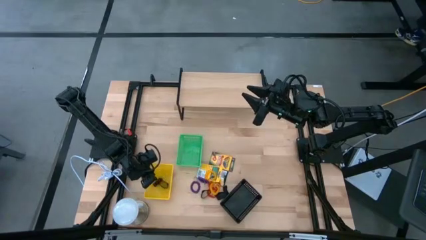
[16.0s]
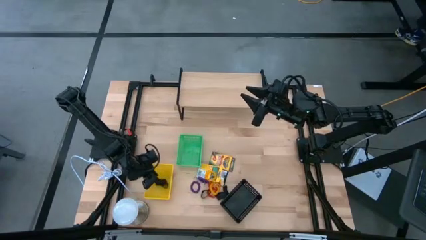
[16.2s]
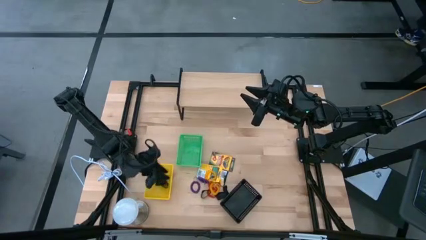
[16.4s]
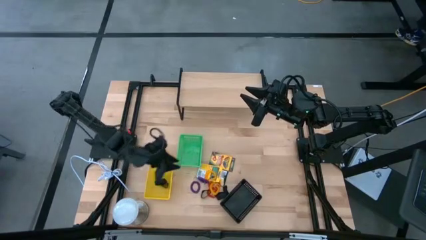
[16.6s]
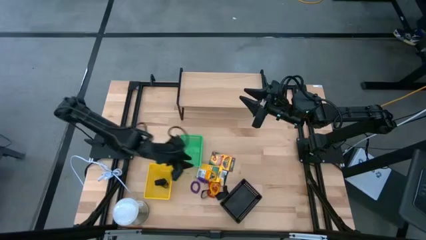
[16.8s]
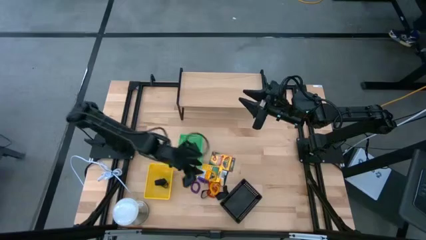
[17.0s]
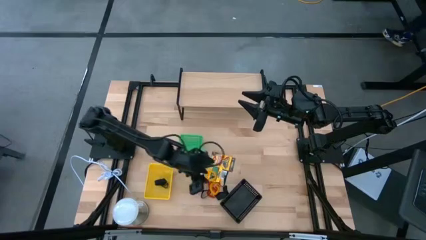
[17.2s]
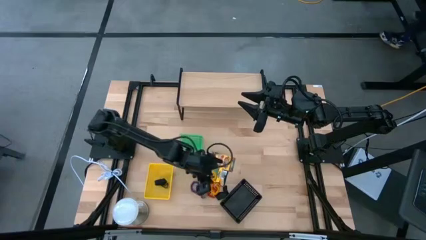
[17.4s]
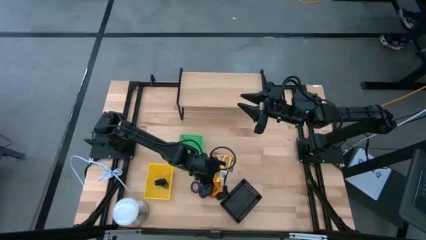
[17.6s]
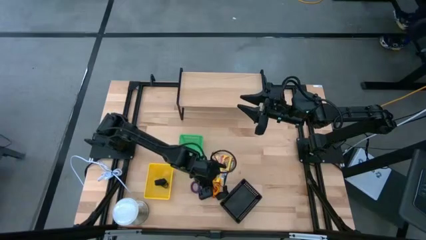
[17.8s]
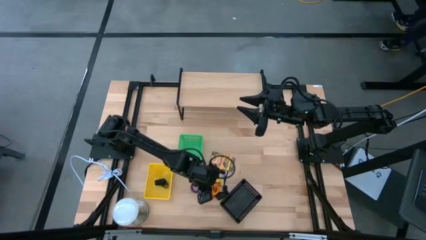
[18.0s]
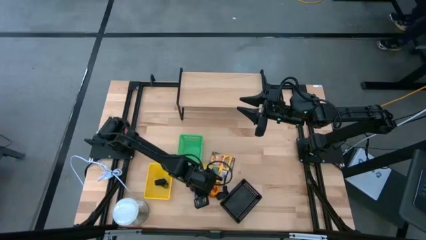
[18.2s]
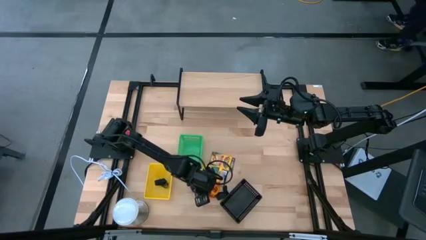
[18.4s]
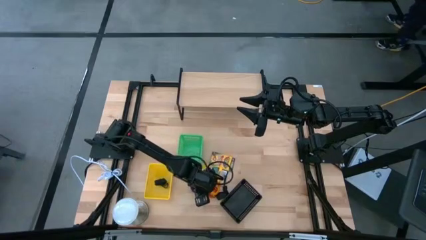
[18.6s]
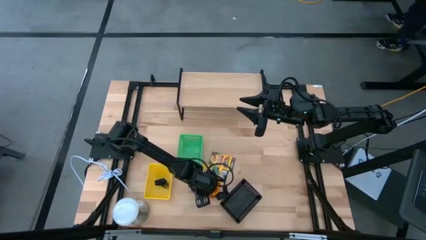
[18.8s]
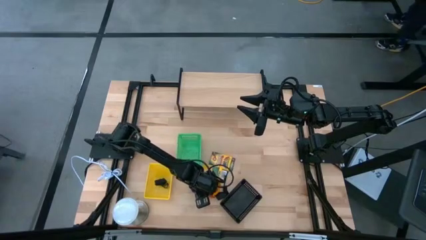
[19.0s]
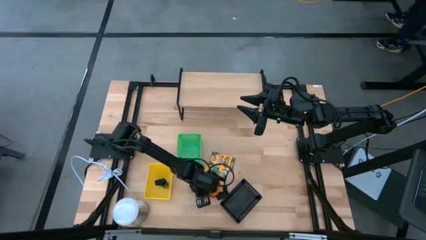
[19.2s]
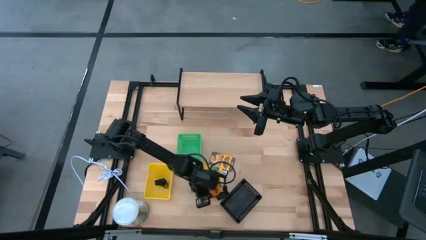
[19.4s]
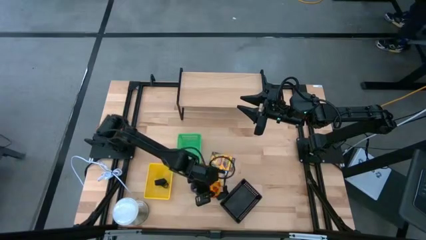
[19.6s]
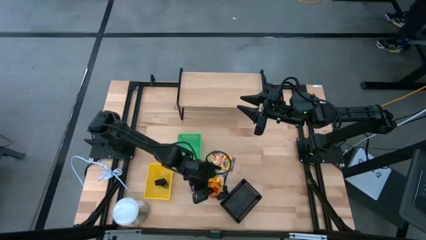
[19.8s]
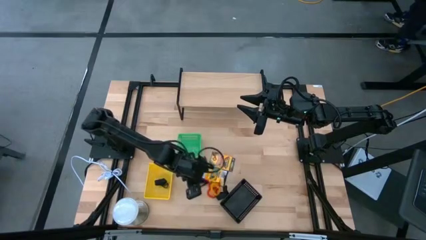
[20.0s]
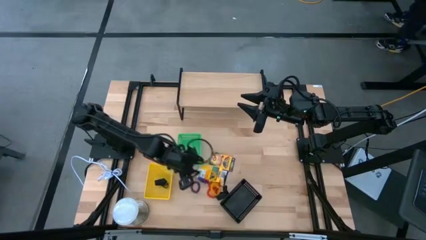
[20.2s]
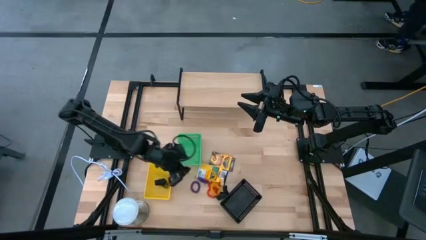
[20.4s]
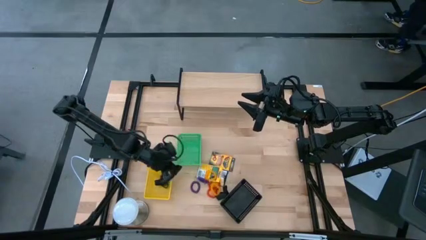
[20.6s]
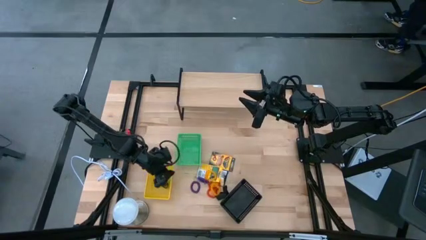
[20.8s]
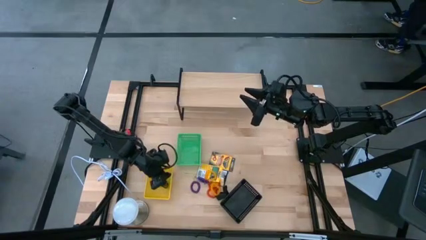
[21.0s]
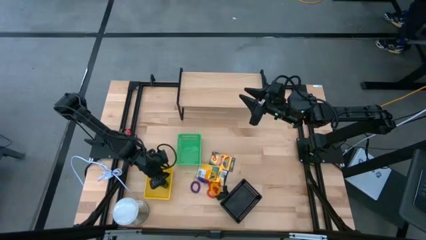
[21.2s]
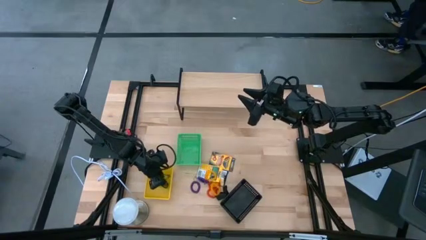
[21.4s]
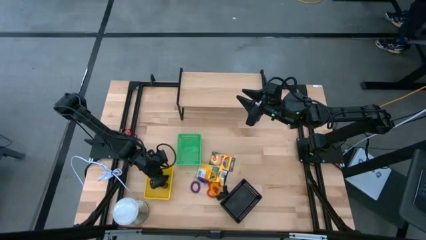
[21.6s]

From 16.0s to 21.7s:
Task: Pick & Place Office Desk Supplies
Put the black rubber band into the yellow basket

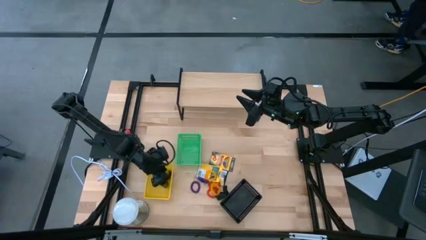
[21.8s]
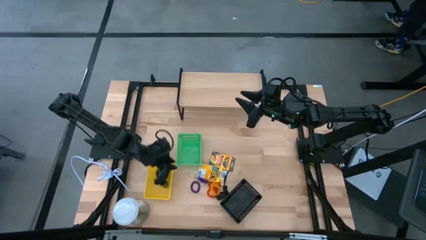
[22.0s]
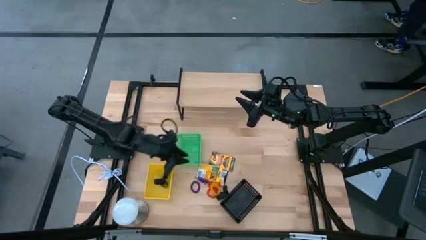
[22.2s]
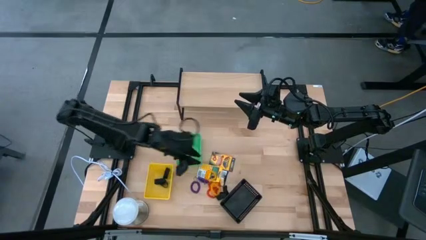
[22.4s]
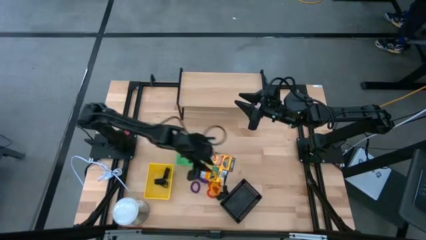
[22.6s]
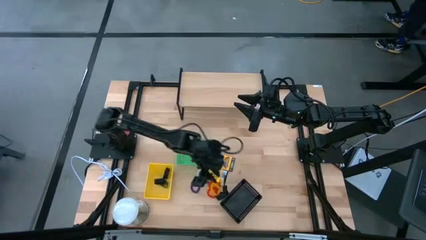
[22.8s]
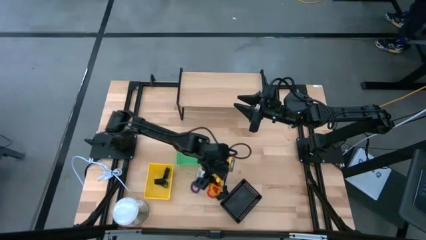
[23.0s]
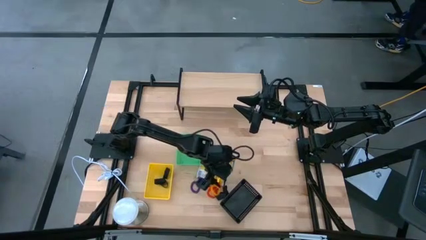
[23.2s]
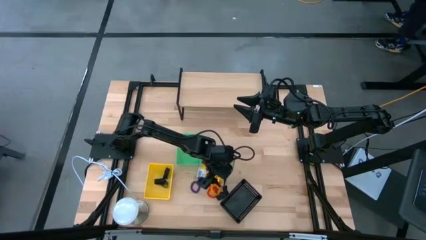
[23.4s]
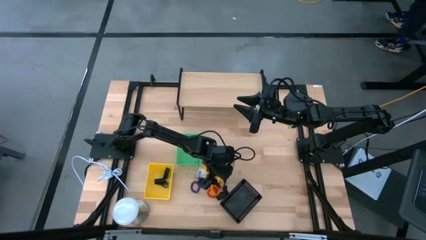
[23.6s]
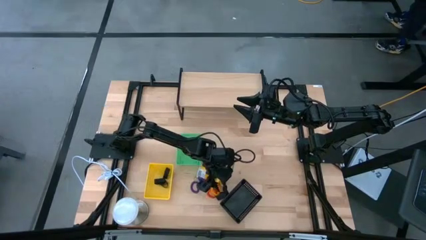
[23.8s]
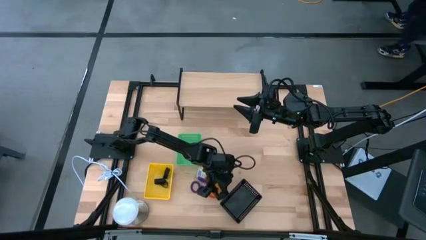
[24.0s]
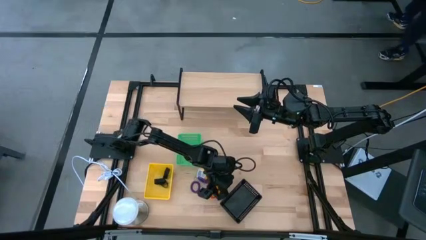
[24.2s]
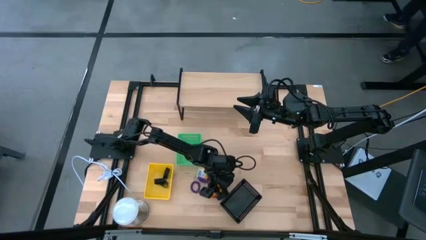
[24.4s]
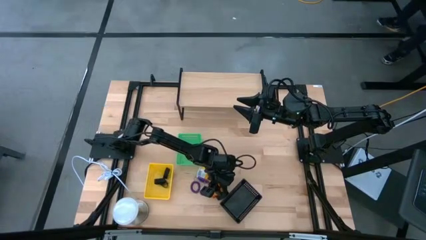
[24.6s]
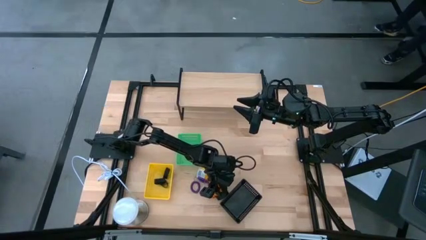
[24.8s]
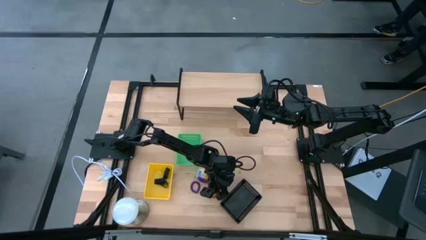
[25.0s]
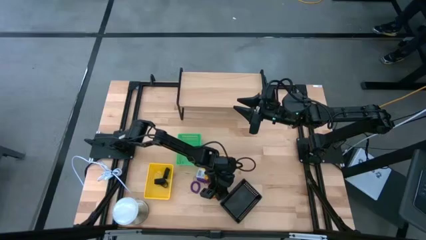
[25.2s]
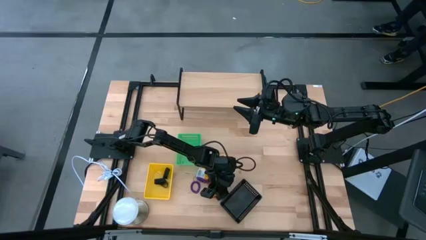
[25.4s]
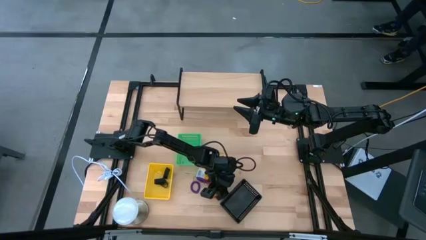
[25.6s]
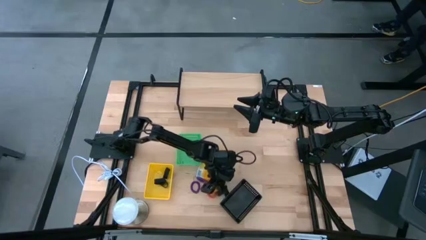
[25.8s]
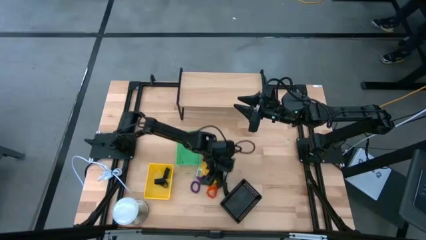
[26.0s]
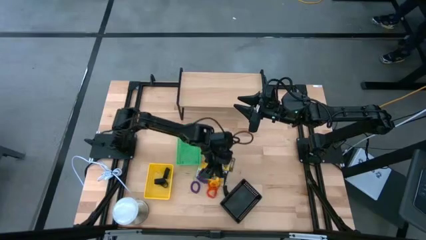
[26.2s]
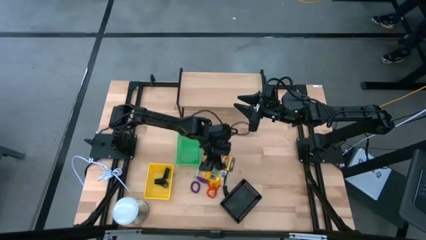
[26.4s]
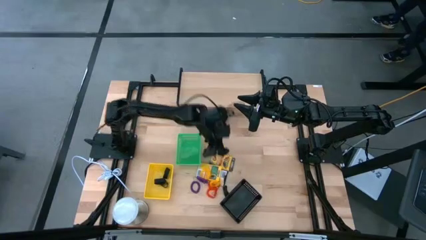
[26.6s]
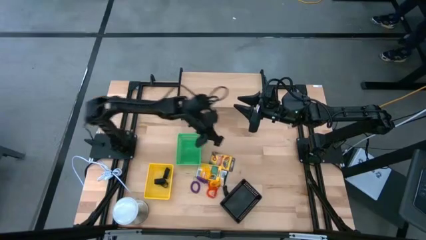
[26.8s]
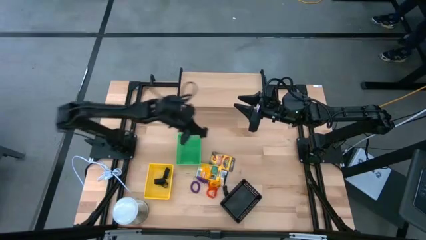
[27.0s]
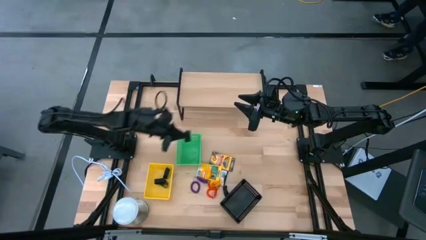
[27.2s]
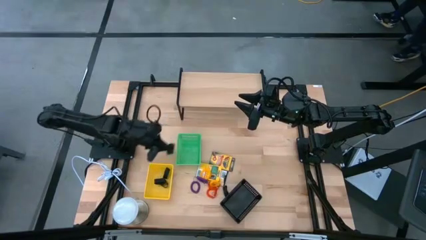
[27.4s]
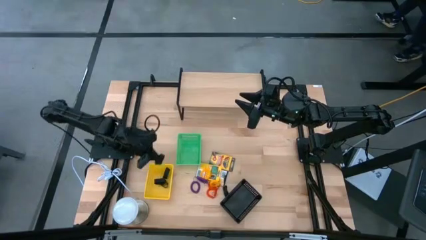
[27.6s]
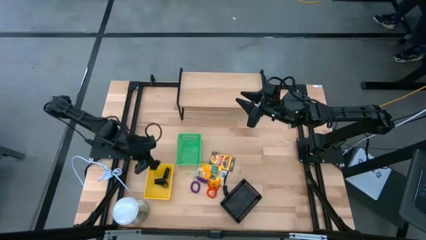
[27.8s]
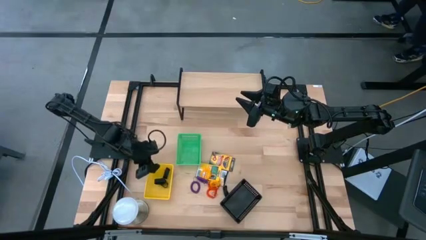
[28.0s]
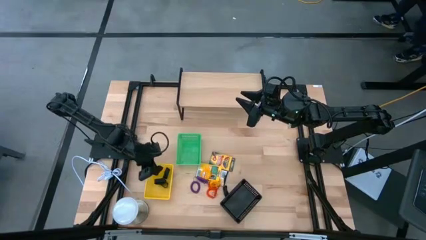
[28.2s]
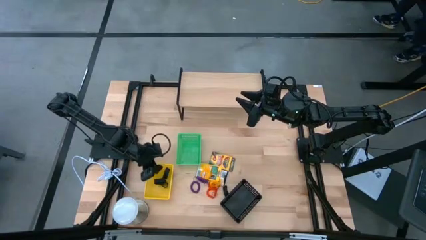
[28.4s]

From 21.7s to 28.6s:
Put the black rubber band into the yellow basket

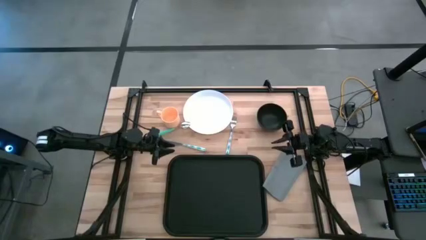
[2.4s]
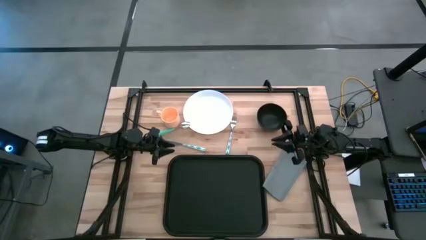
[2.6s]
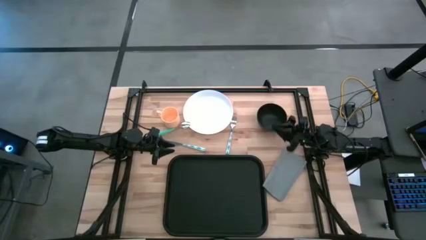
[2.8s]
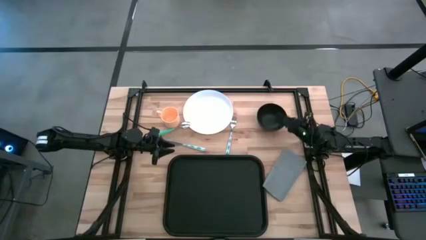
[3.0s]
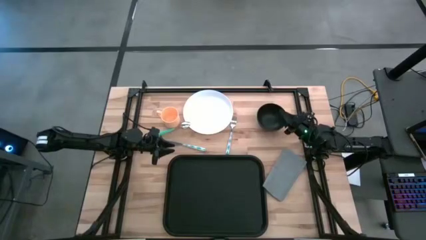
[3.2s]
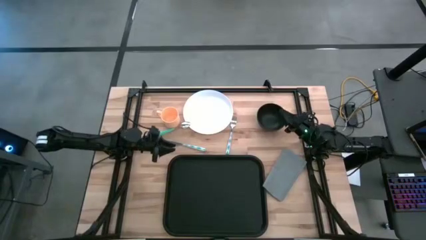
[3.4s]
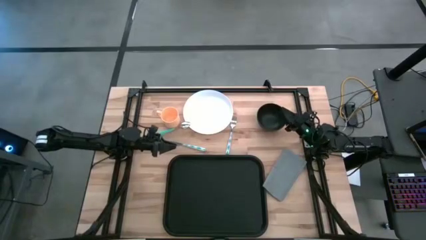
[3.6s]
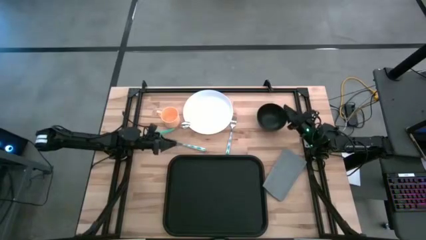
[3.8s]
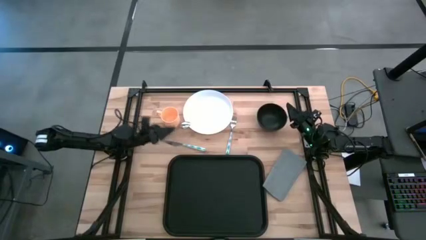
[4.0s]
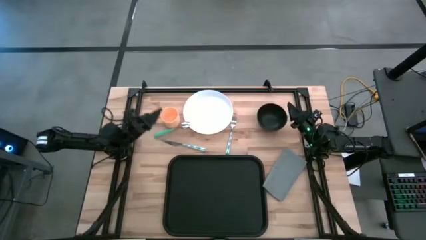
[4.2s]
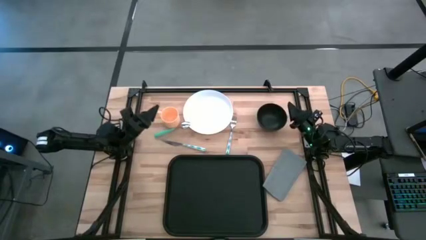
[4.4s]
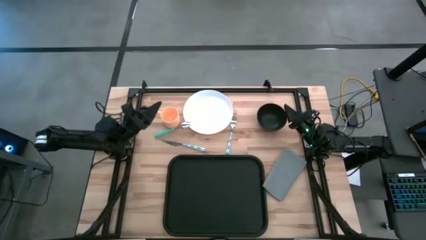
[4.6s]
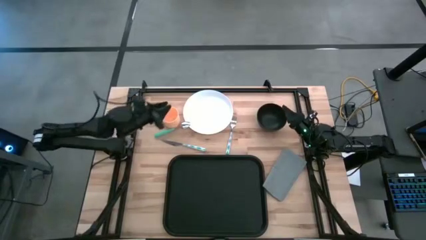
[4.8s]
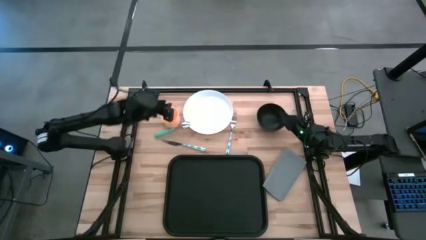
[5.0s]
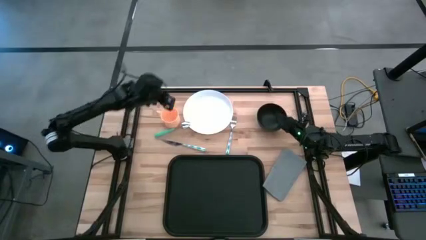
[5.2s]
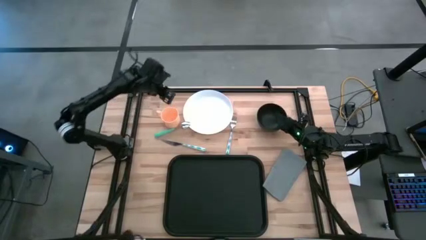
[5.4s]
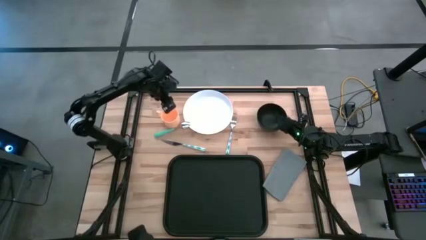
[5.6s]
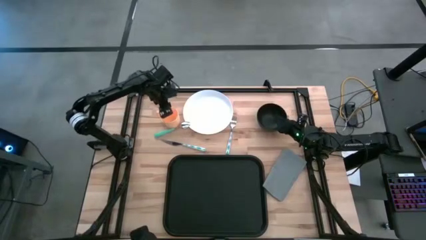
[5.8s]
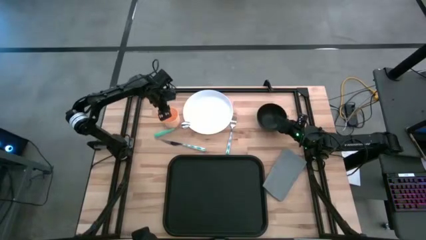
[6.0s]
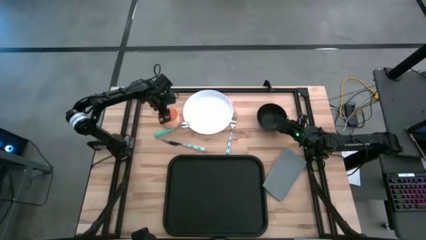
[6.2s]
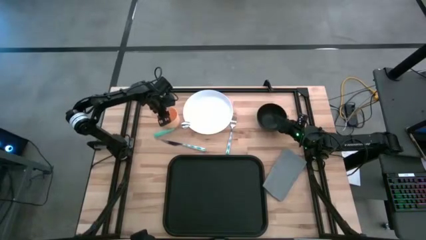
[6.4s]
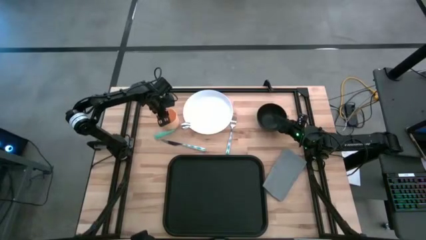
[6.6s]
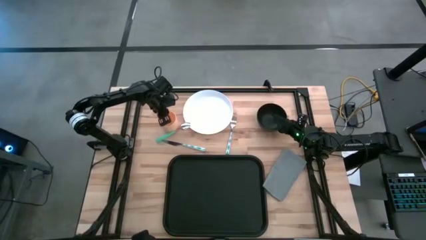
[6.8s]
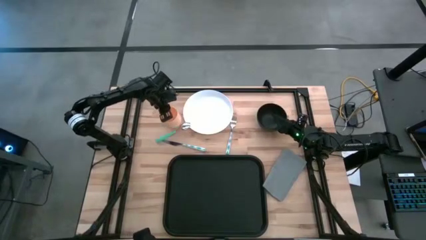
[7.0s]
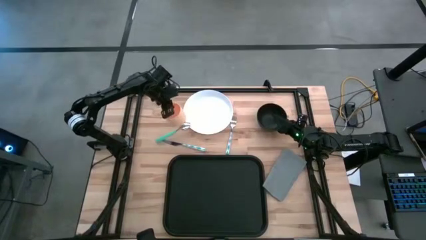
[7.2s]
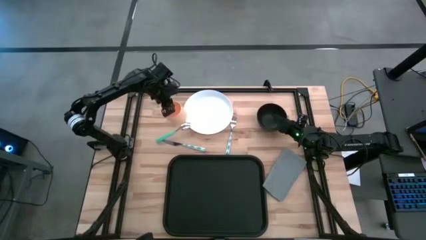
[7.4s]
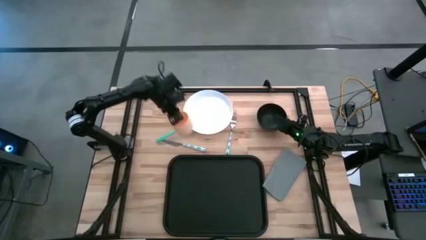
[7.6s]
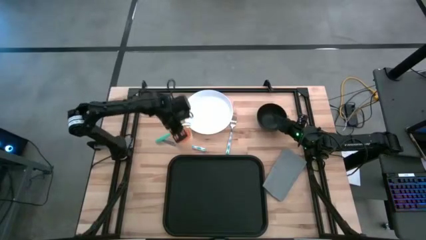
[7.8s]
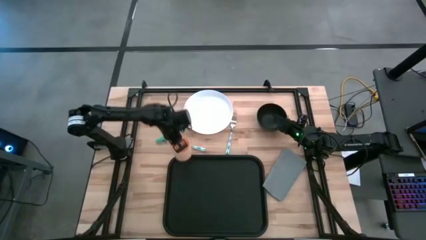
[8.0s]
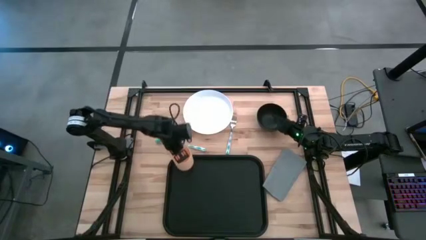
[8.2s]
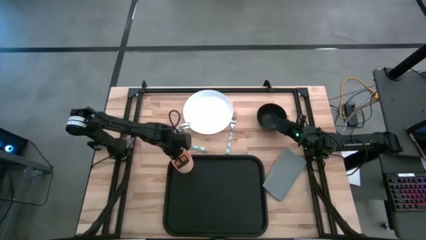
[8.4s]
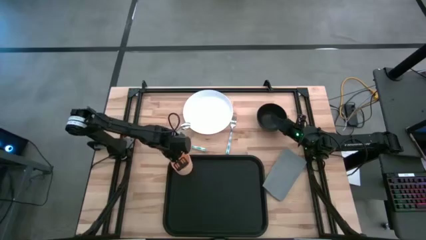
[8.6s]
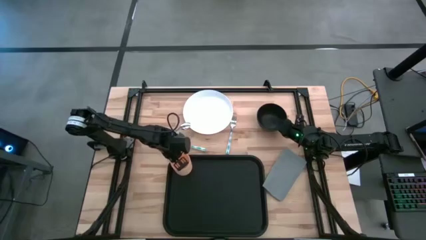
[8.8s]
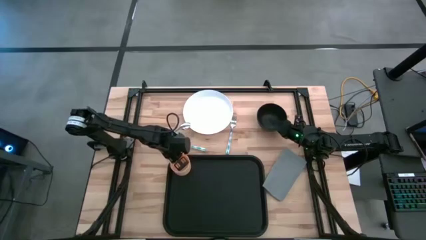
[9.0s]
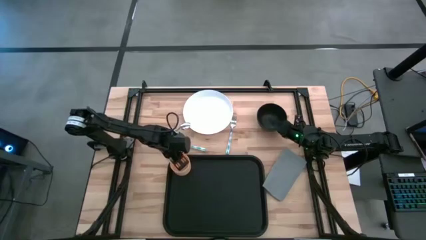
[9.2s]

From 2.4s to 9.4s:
Task: Set up tray
Put the orange mug to the top left of the black tray
